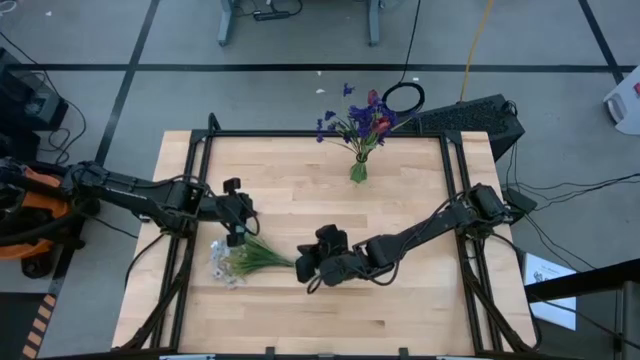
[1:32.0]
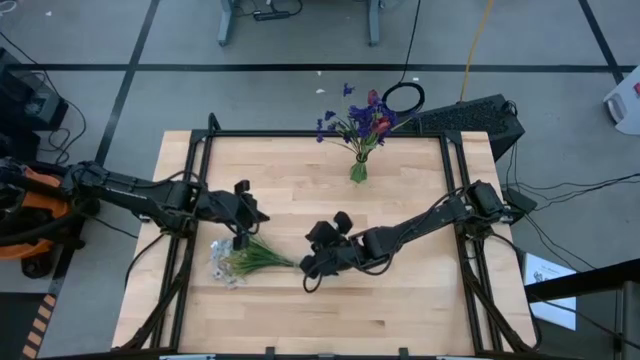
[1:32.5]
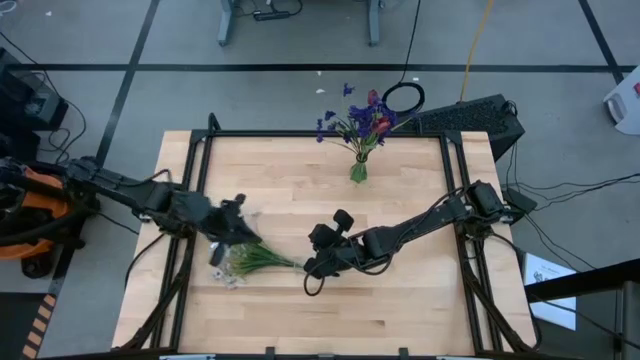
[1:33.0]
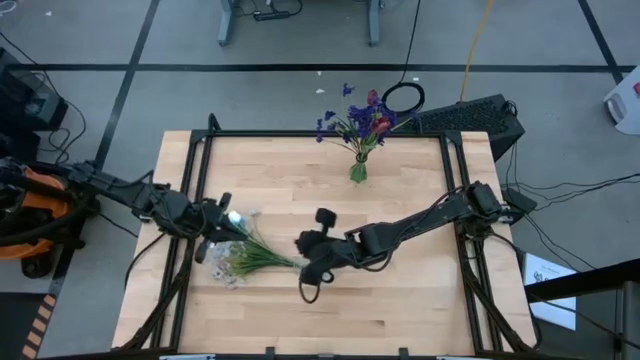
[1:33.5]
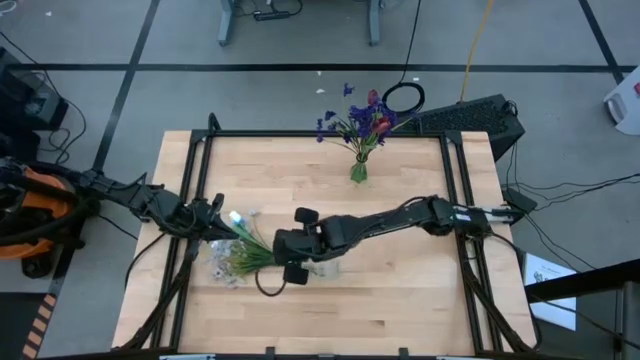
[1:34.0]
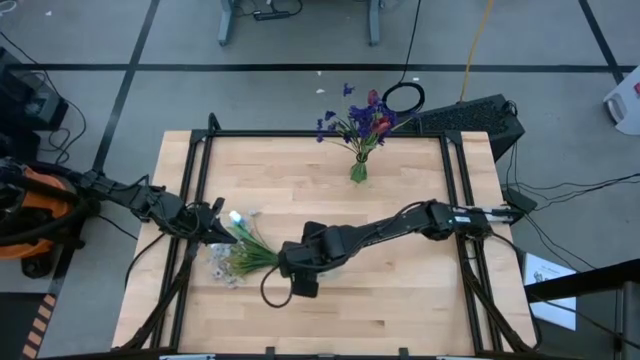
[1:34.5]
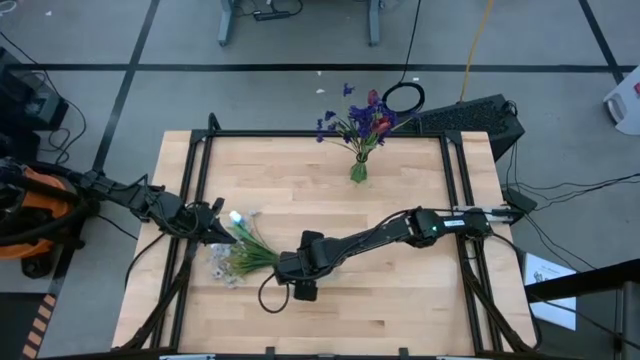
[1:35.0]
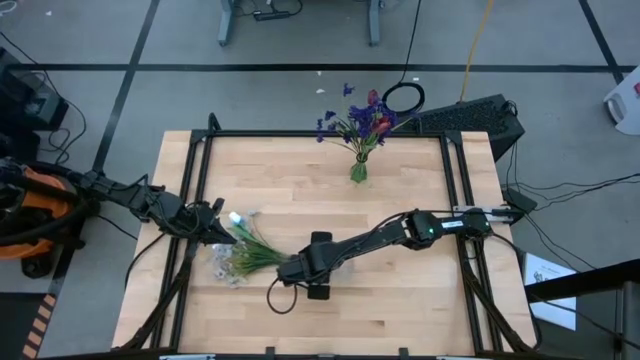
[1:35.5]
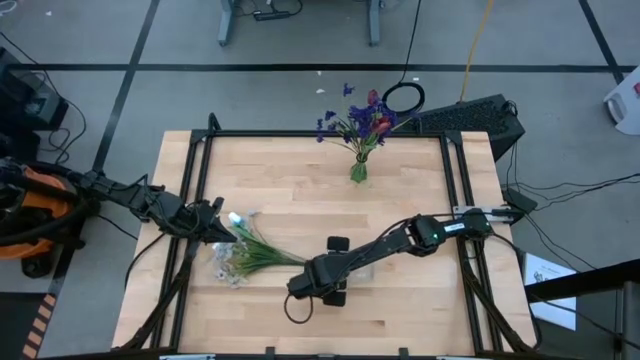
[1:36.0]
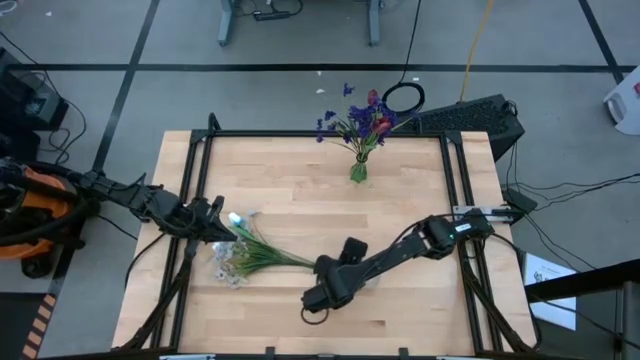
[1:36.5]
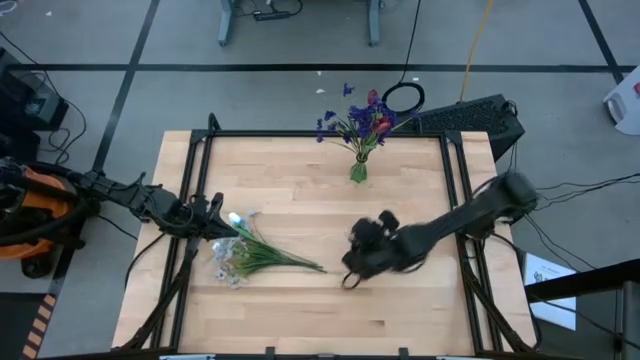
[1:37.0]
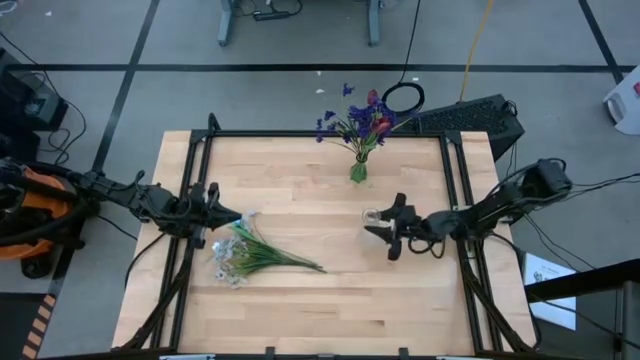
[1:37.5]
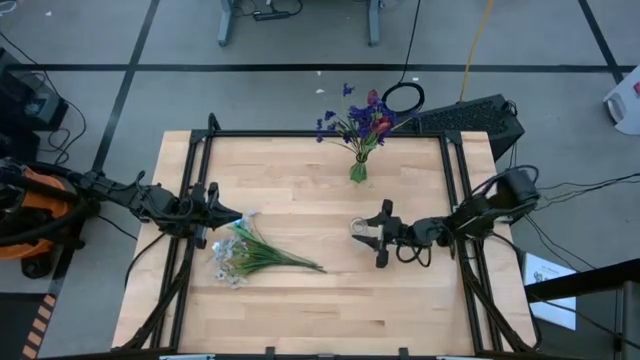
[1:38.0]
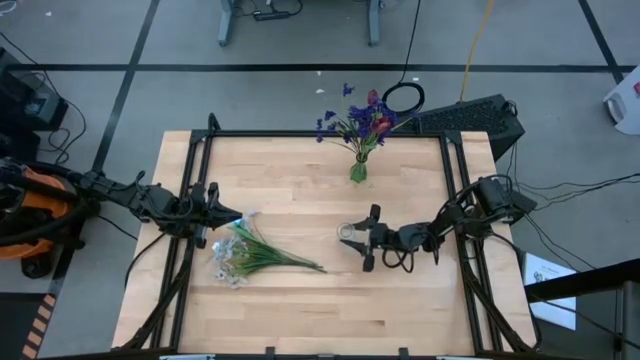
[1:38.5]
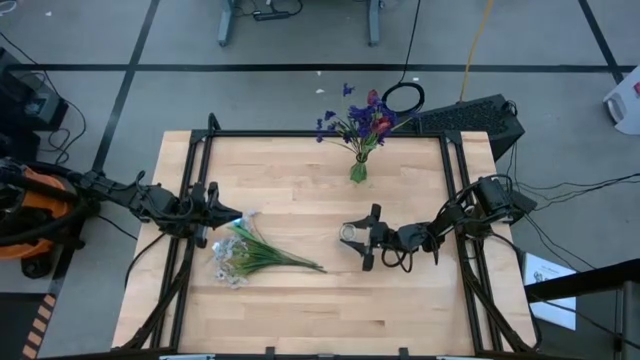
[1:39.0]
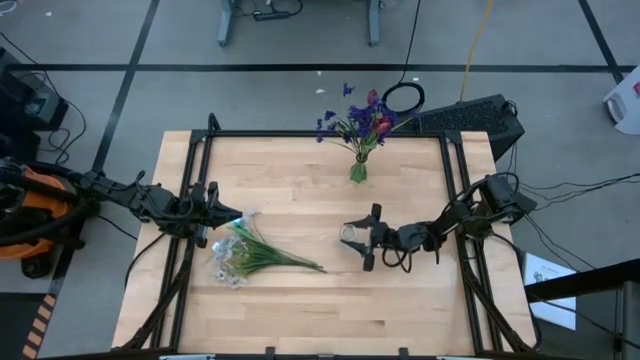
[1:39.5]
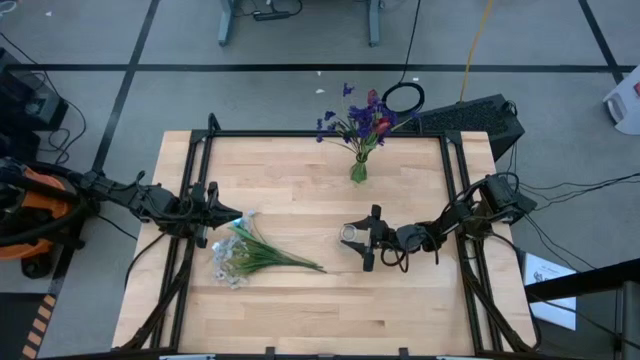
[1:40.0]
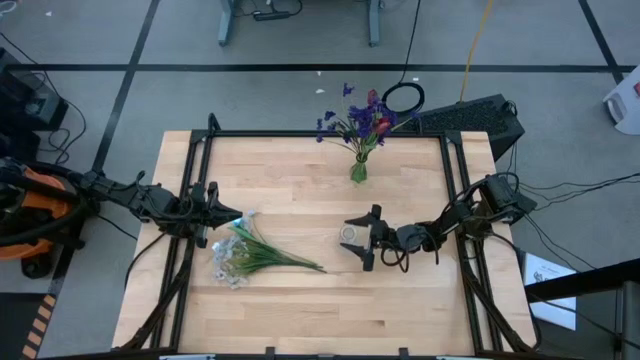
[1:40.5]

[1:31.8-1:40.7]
Task: Sort flowers into vase by color
Adjust the transparent flower vase

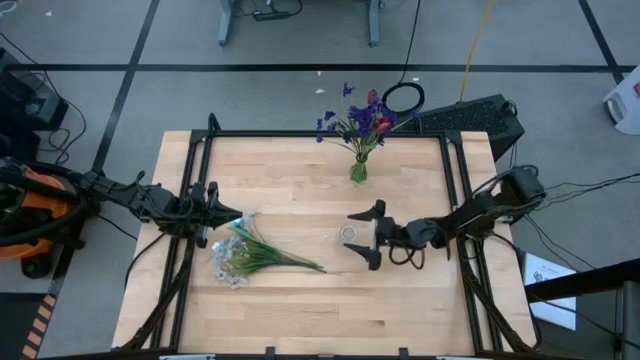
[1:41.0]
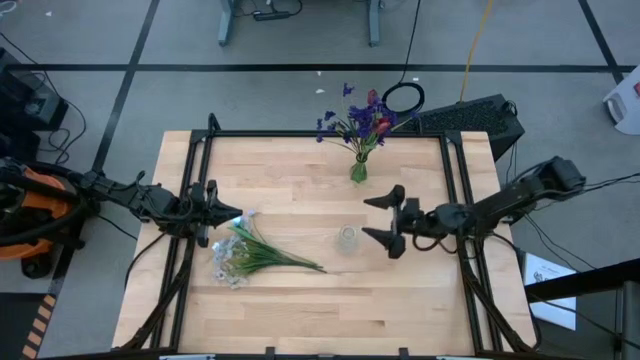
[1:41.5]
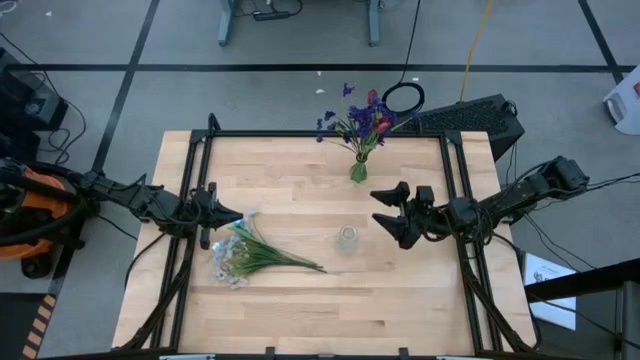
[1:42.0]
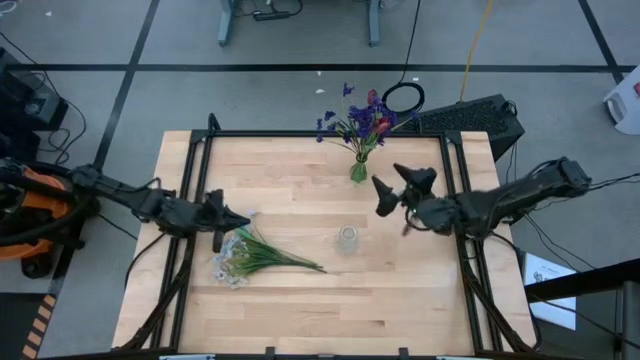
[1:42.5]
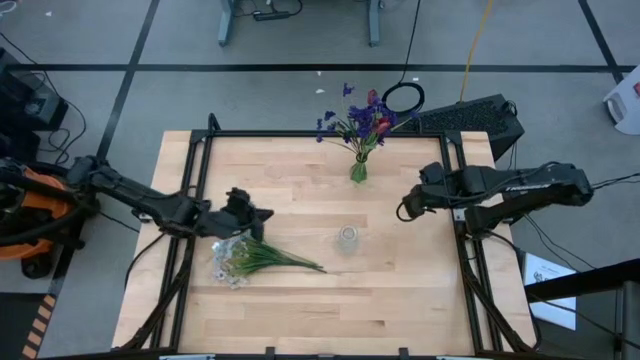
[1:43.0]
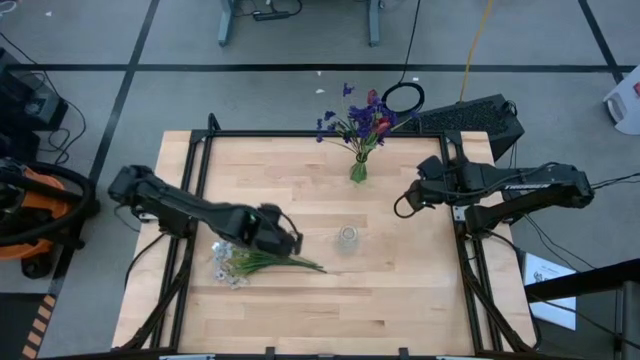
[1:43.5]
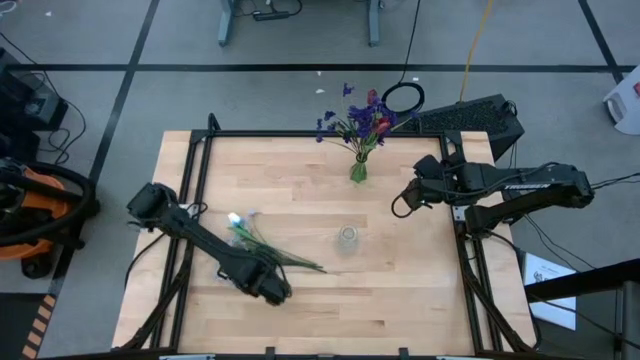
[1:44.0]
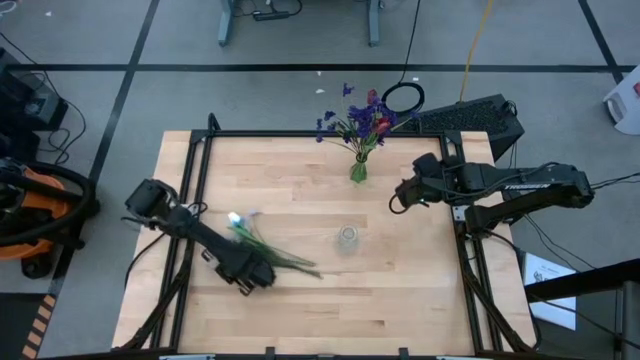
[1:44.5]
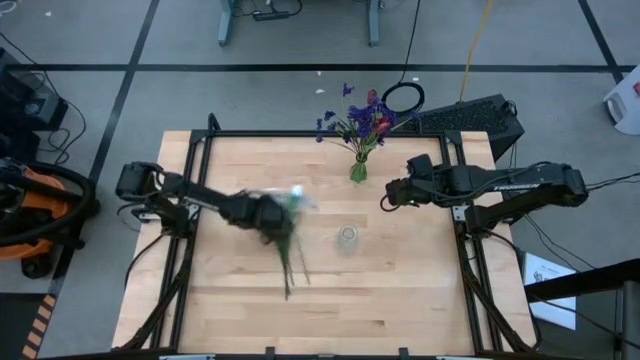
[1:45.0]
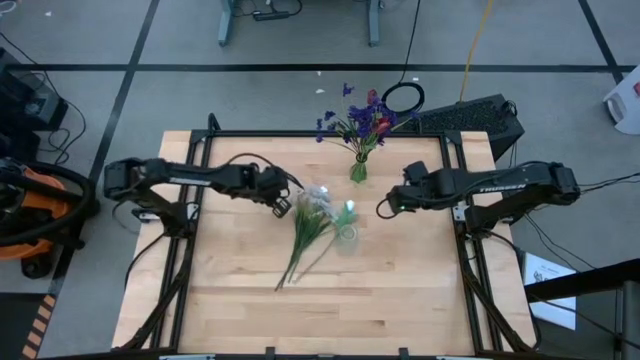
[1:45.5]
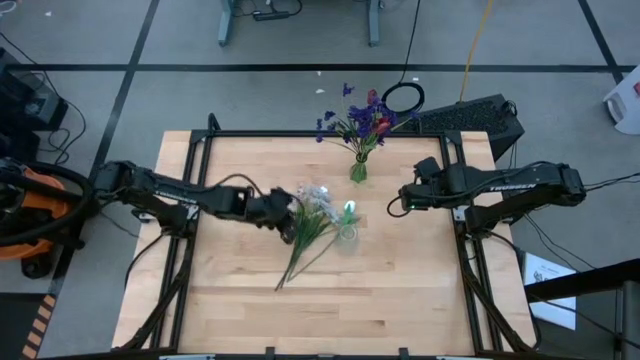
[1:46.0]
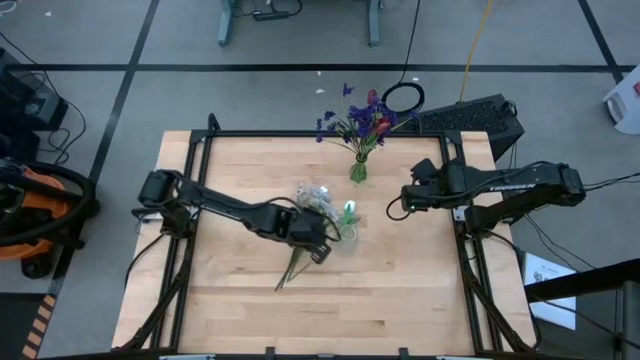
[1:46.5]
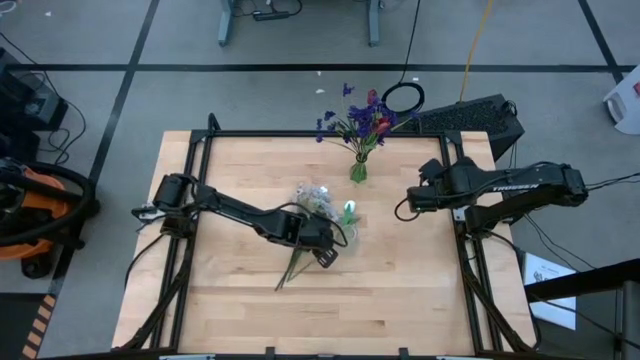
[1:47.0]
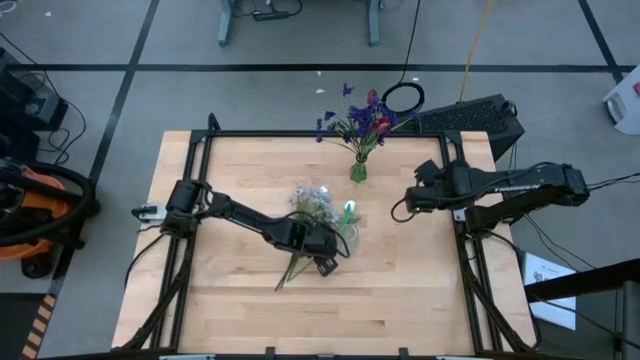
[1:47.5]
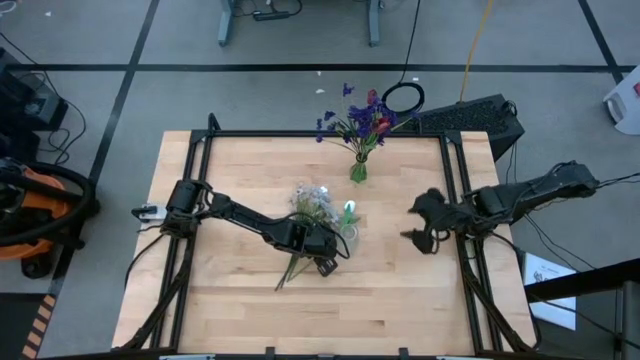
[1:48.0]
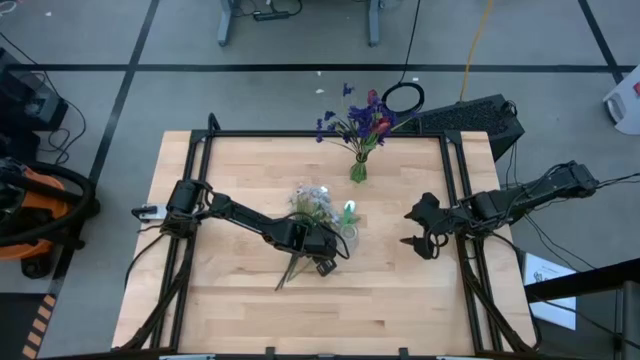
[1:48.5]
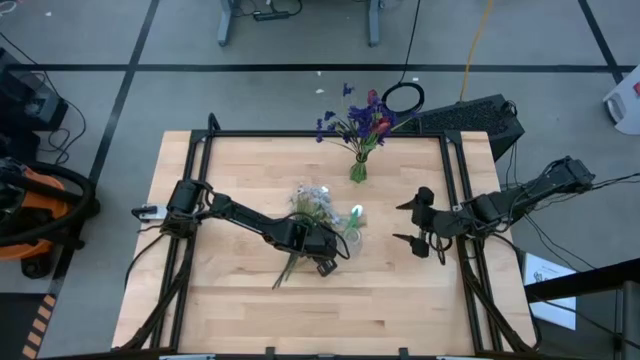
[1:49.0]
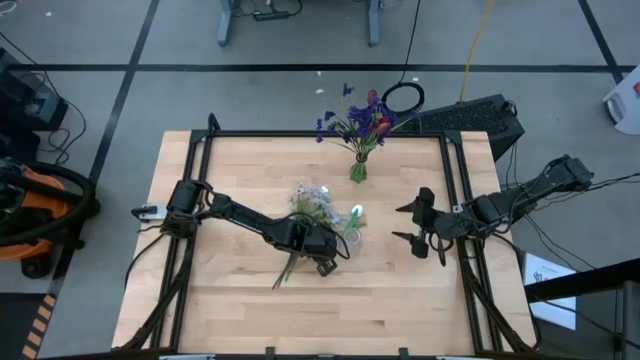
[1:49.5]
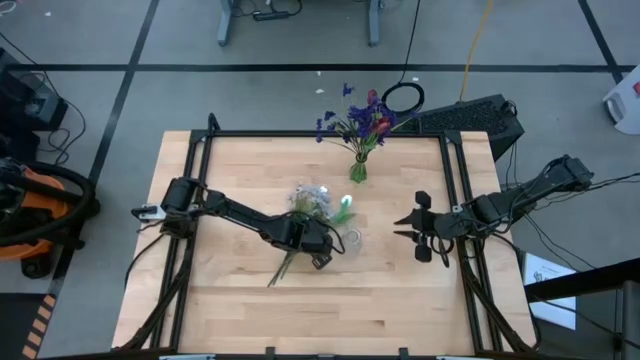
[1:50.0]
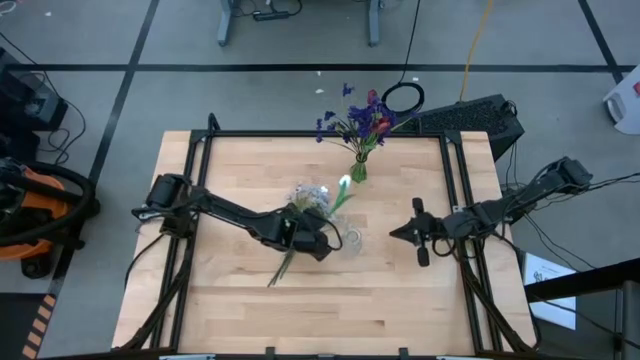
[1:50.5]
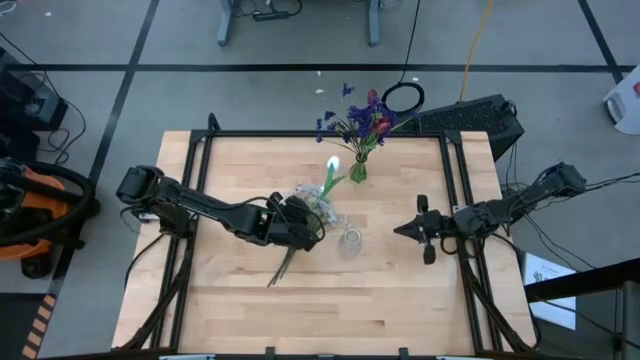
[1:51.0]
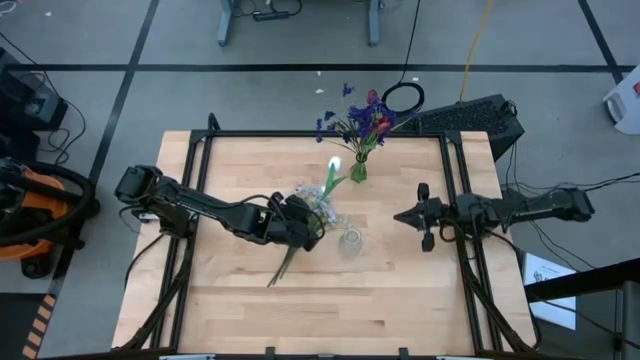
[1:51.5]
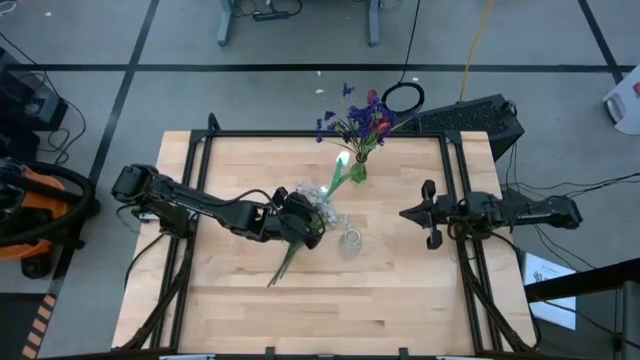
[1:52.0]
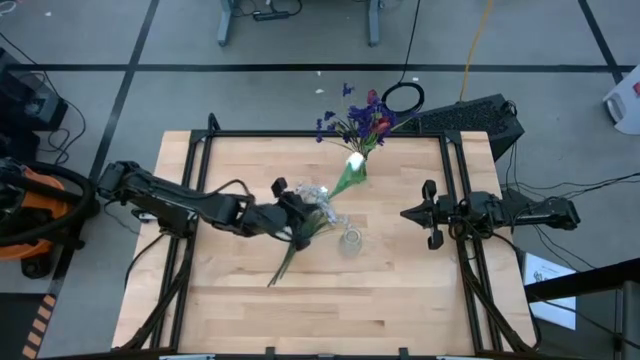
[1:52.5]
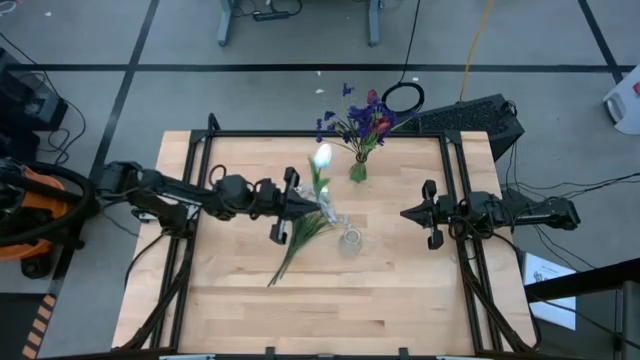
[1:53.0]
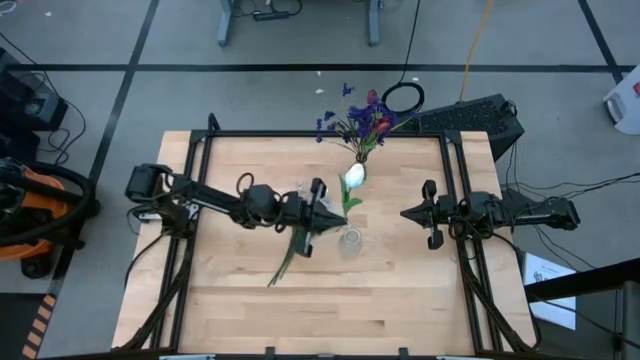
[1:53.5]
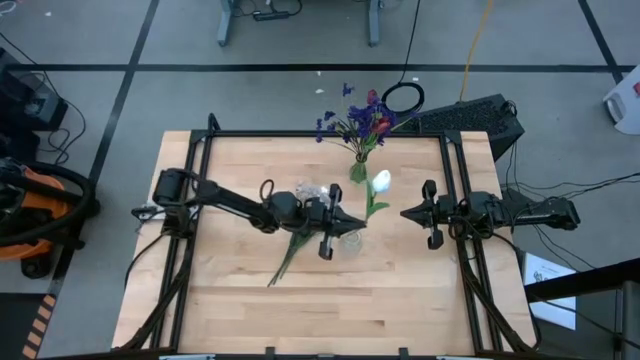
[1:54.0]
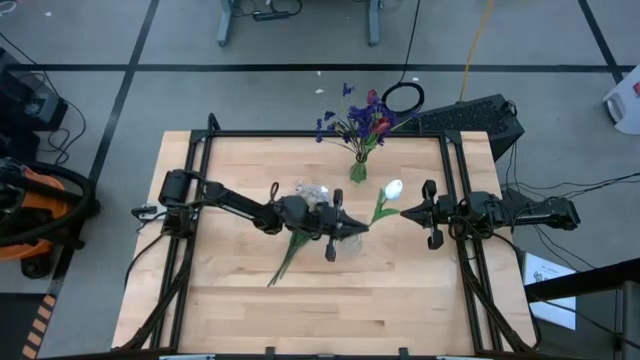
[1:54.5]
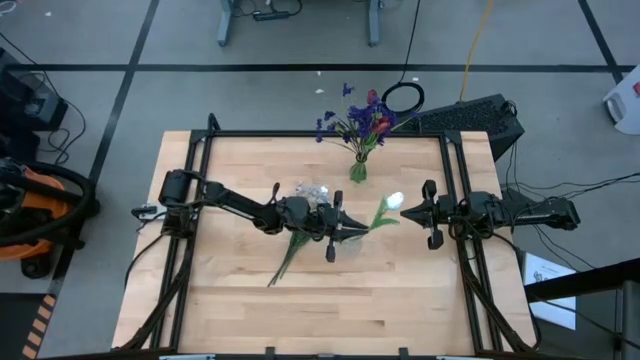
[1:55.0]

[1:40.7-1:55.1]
Put the right white tulip into the transparent flower vase
